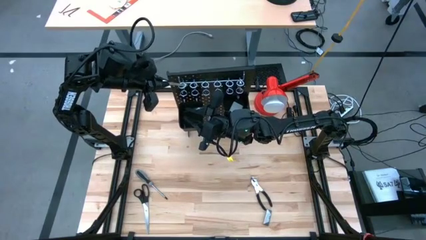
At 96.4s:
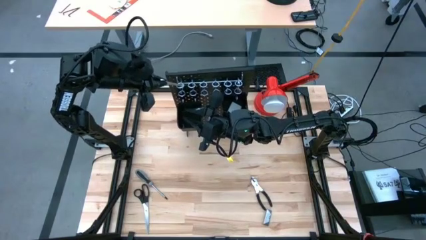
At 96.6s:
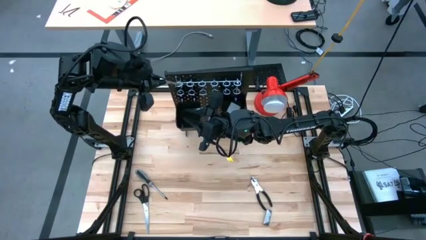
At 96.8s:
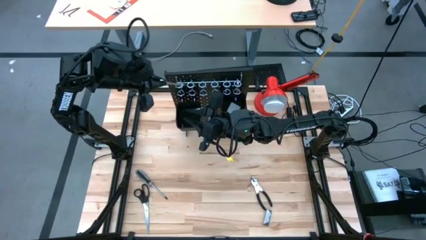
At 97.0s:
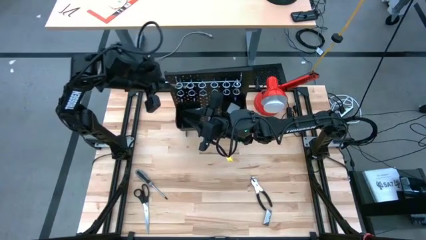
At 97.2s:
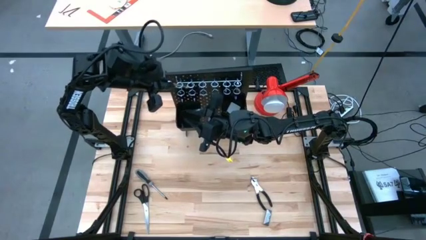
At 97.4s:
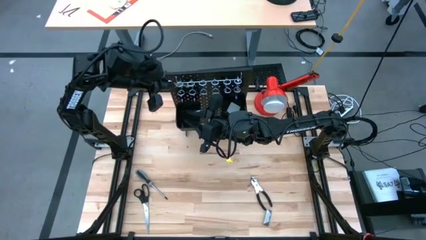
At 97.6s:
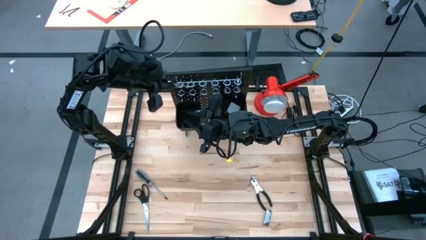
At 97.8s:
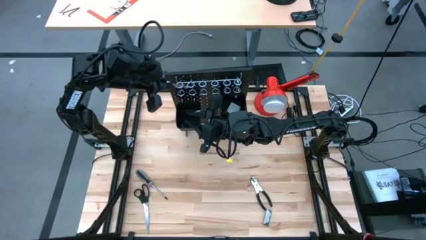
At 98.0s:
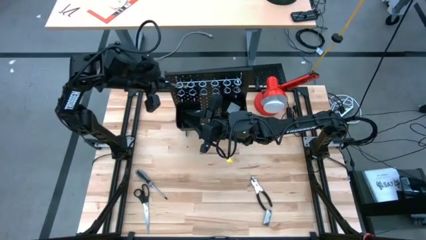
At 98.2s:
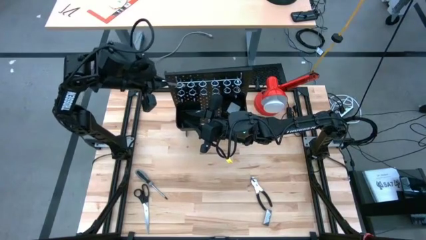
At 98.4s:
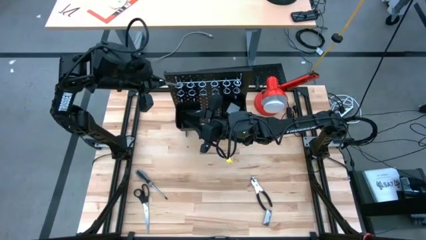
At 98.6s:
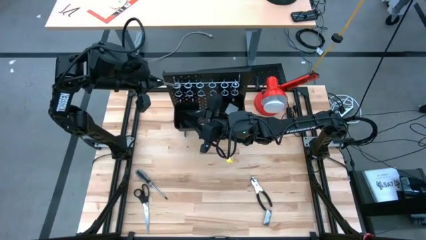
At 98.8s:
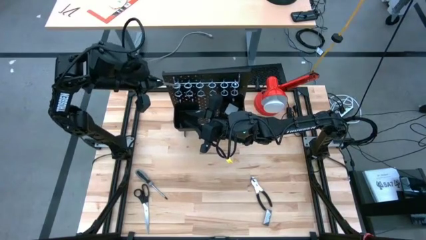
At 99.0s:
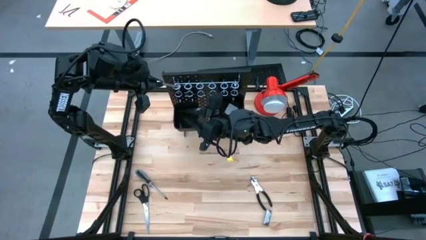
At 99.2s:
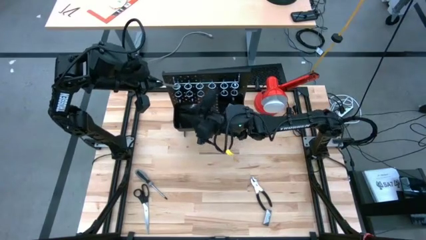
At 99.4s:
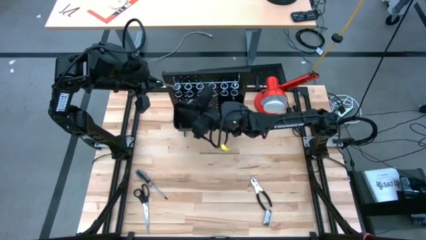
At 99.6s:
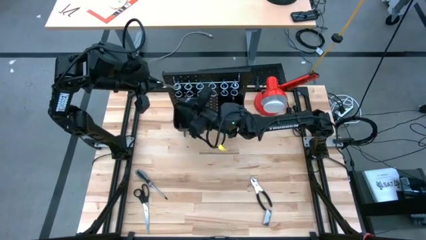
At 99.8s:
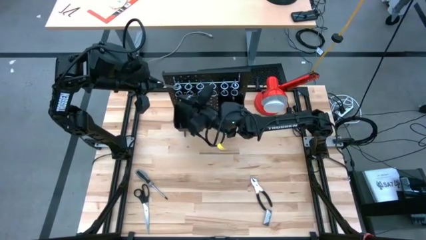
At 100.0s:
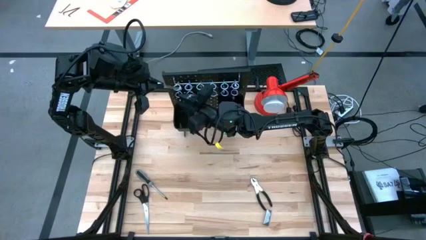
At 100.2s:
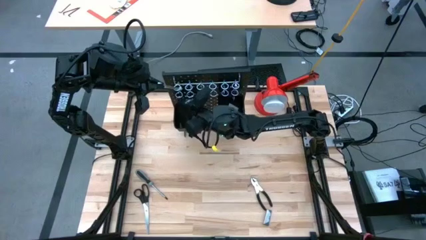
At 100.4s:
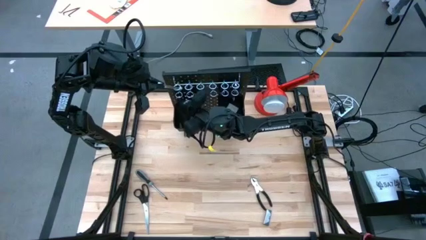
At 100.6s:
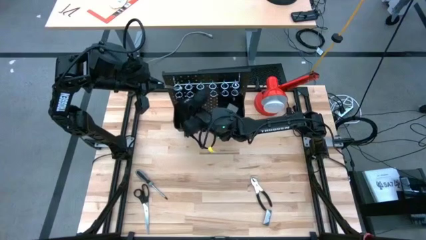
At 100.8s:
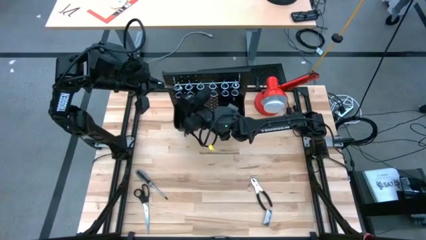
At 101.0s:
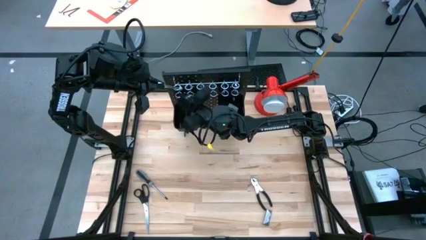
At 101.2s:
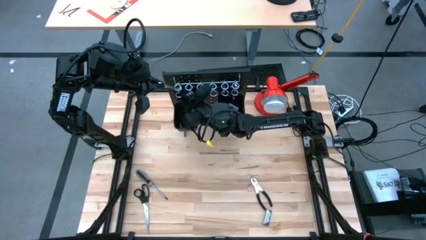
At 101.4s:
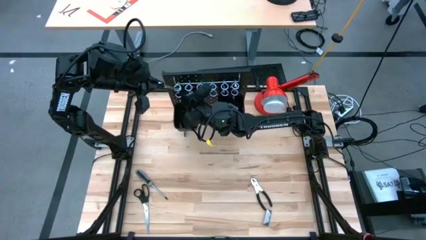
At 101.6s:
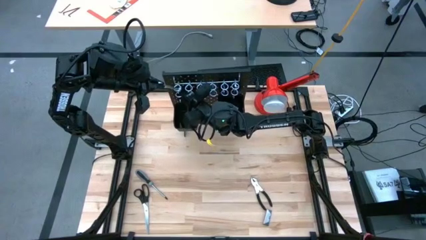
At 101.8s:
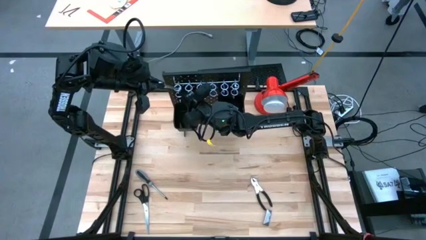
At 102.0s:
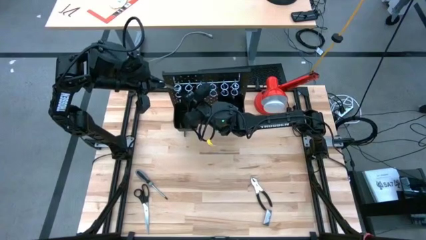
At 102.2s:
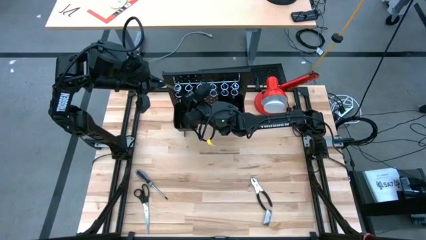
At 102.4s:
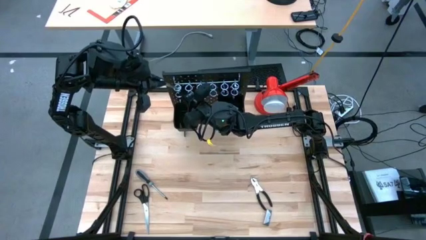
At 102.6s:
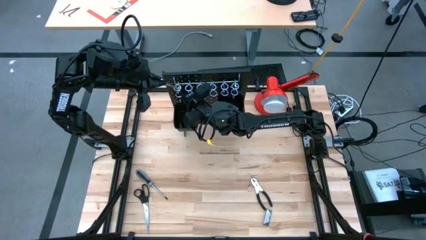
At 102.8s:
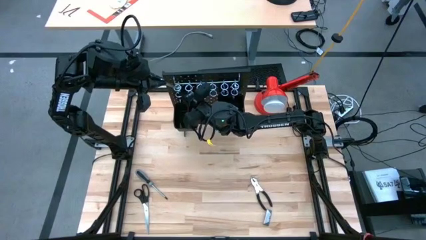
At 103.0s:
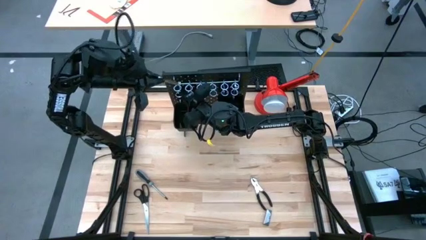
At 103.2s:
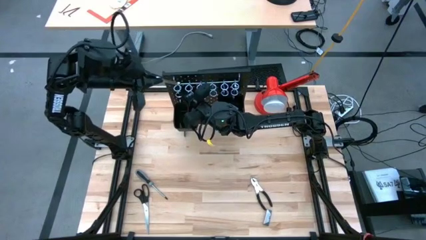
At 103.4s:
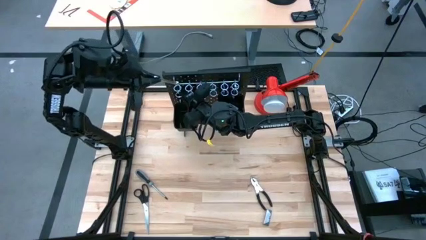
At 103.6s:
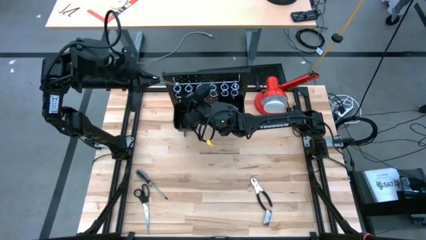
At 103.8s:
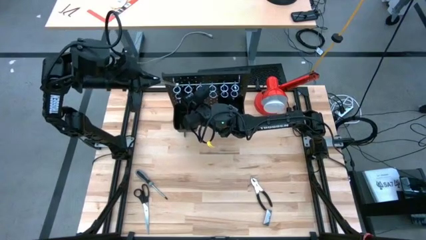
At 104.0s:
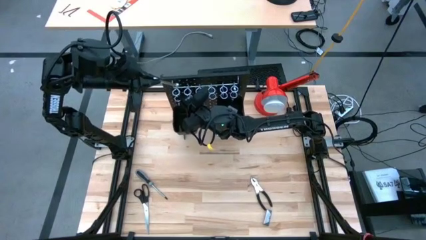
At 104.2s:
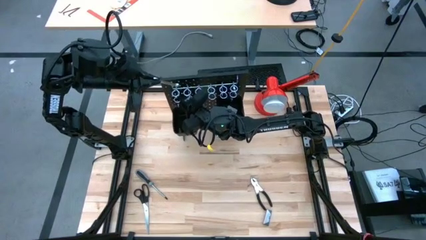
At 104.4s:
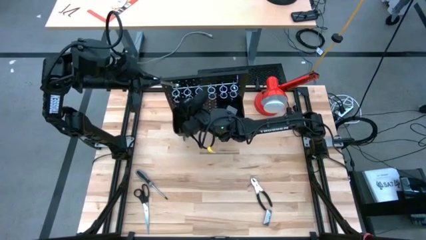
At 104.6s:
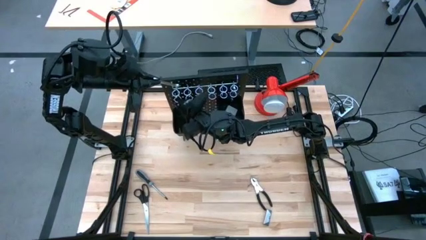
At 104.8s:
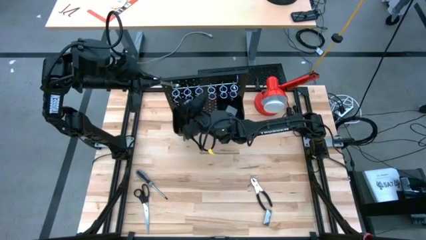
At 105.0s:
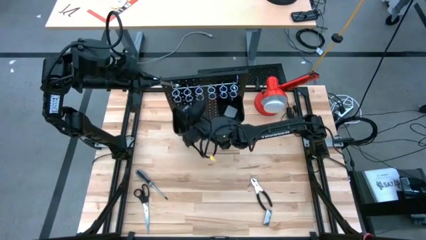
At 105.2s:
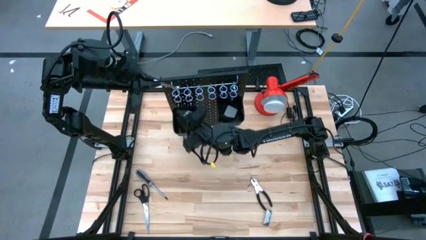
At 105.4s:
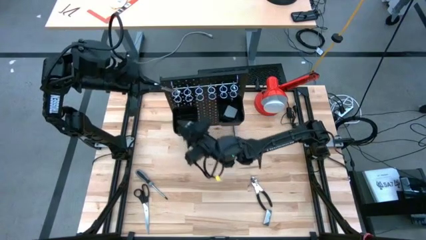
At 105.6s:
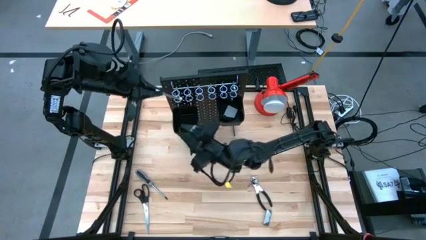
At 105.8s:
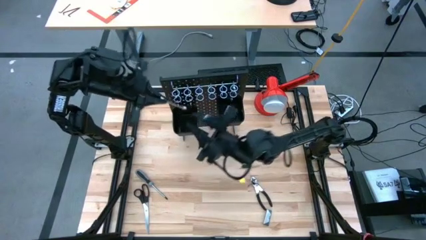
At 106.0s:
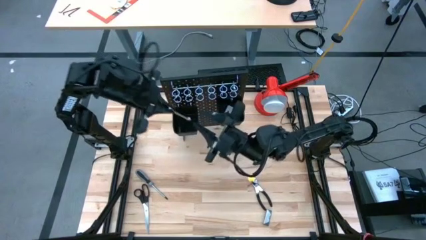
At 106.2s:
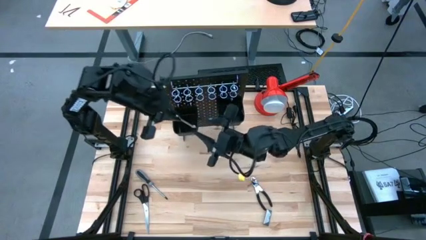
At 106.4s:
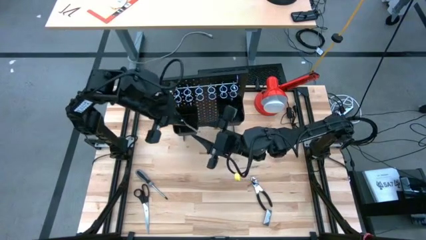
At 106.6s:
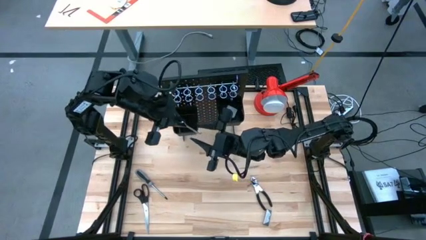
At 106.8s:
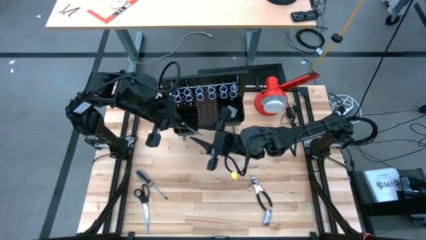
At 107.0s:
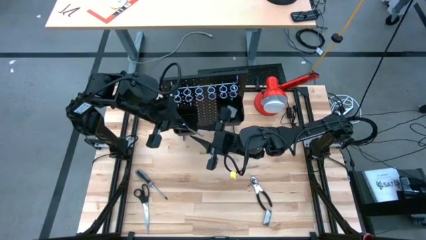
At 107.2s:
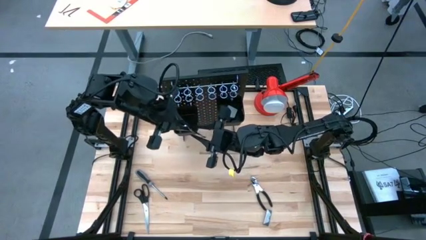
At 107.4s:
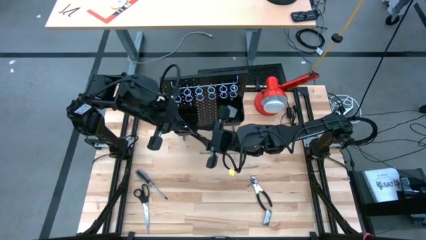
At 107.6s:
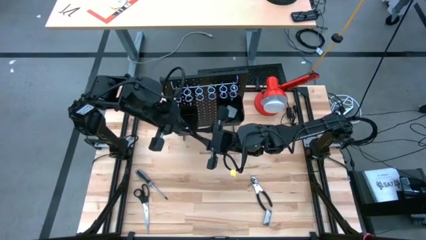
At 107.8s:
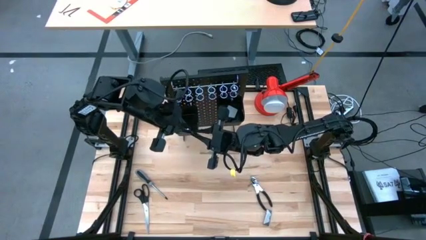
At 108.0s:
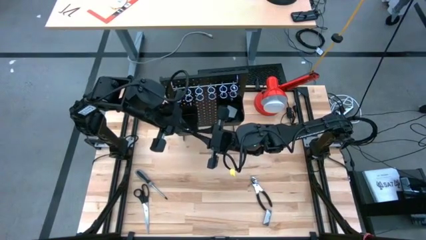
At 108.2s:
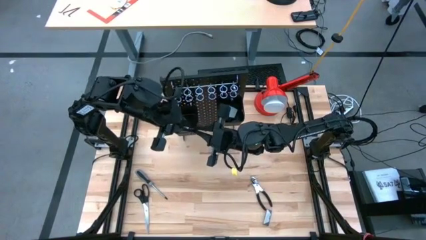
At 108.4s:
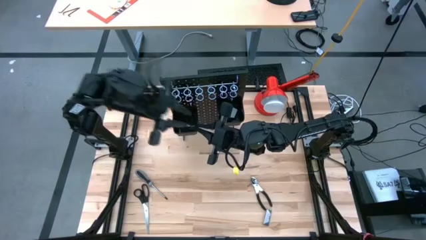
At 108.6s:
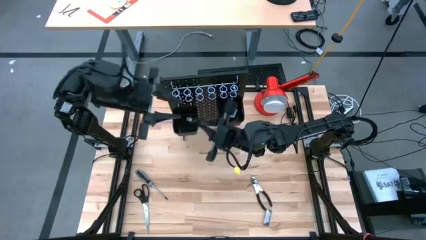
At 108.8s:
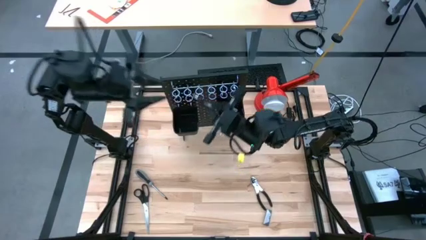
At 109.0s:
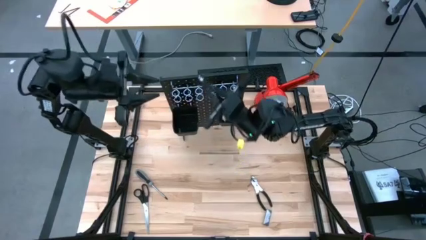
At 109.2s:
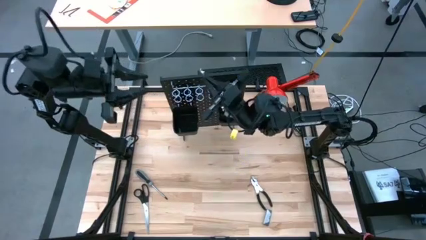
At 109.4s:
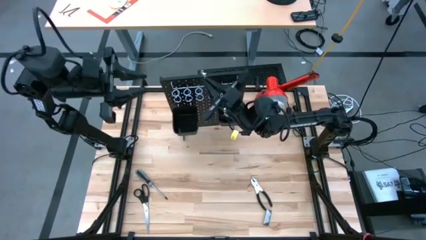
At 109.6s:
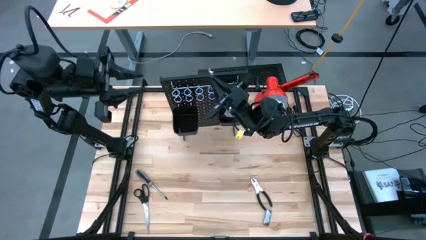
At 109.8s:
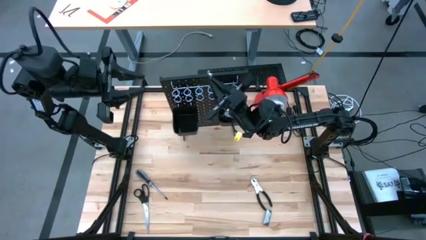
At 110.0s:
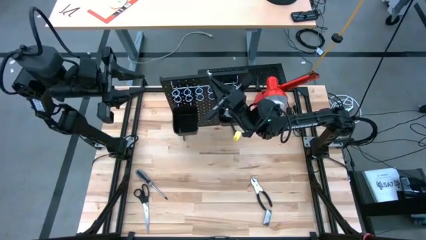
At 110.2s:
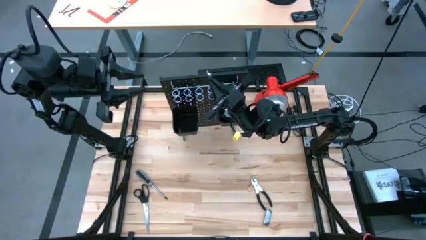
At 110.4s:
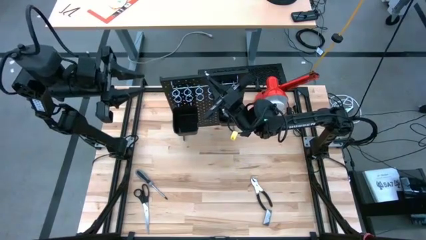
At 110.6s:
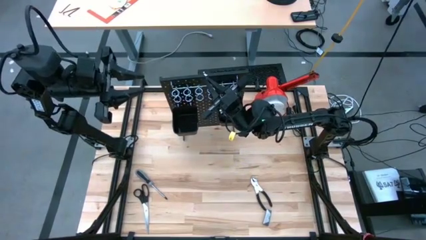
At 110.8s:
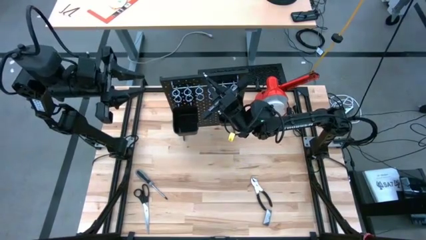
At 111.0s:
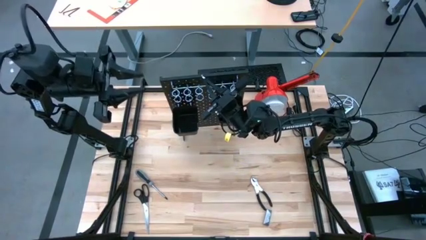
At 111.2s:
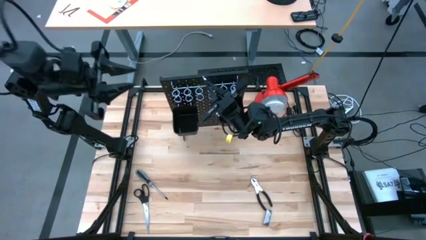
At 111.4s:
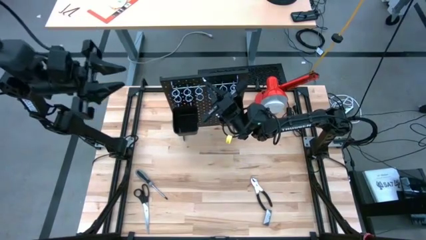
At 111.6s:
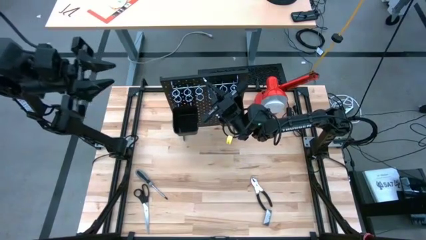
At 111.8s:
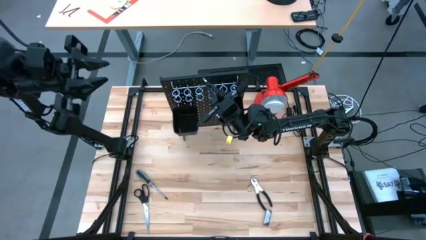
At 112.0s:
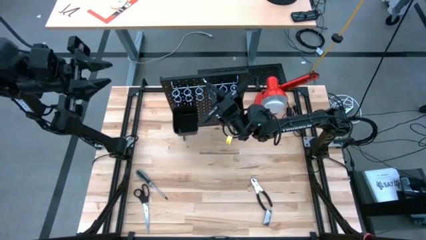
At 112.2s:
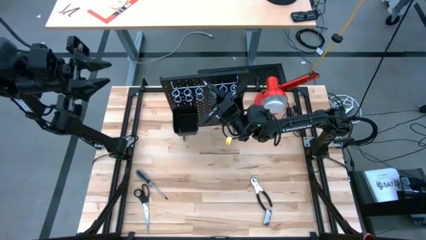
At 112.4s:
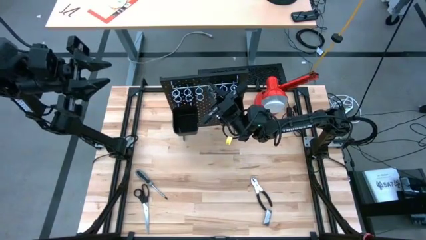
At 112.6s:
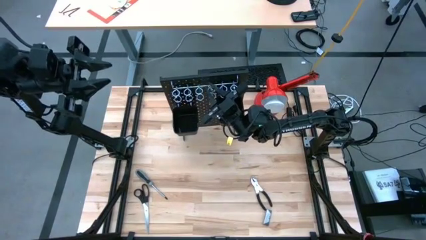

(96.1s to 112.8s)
Task: Hang tools onto peg board
Hang the wrench on the pegboard
